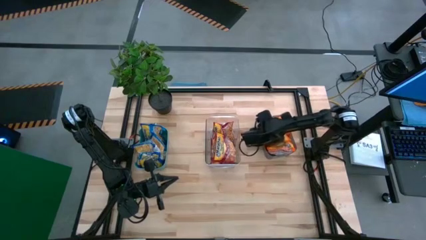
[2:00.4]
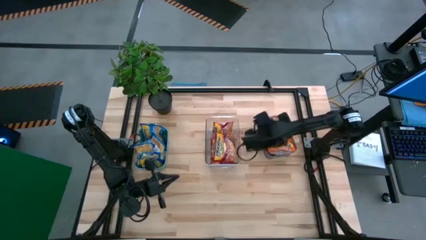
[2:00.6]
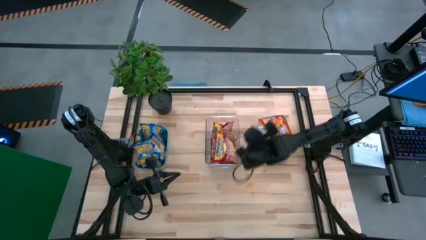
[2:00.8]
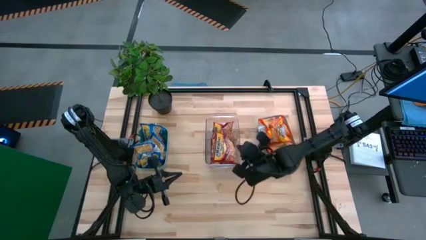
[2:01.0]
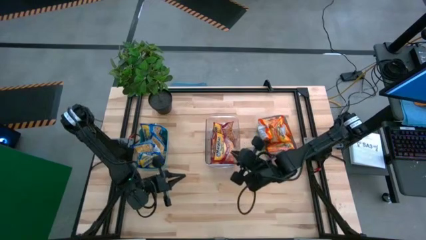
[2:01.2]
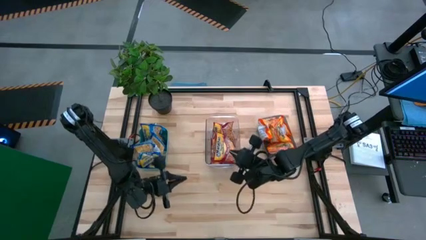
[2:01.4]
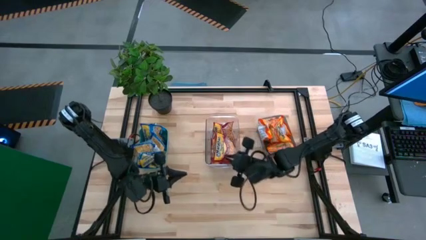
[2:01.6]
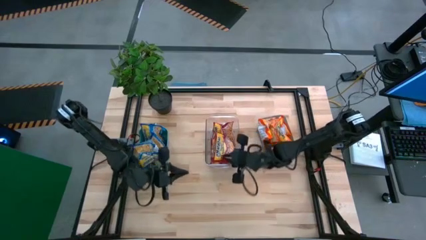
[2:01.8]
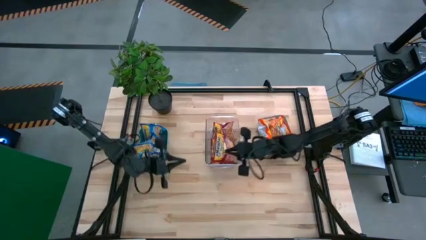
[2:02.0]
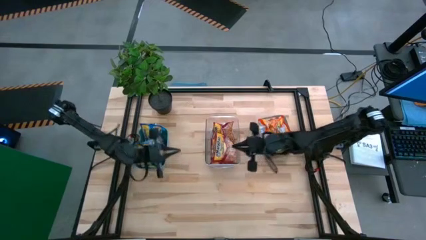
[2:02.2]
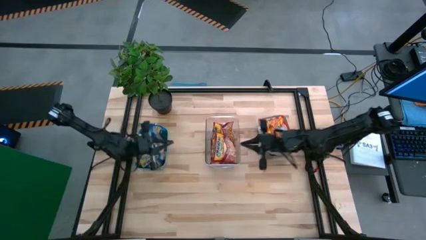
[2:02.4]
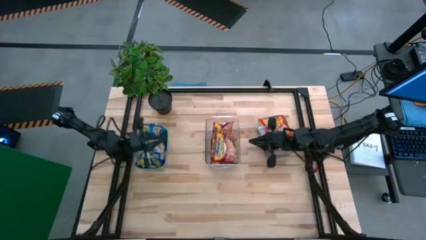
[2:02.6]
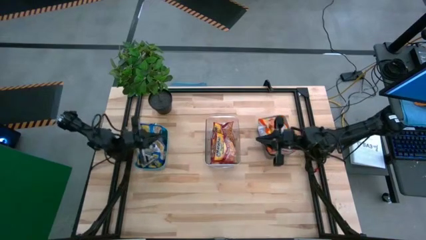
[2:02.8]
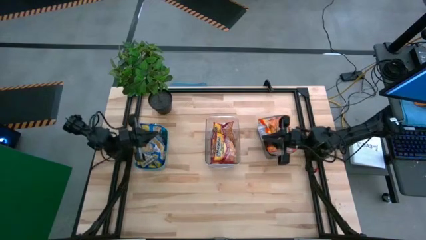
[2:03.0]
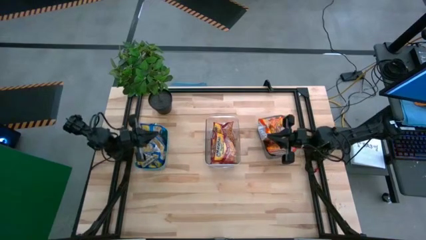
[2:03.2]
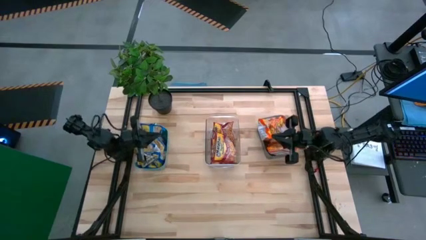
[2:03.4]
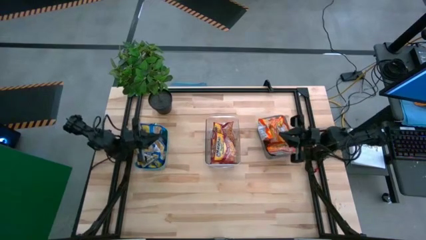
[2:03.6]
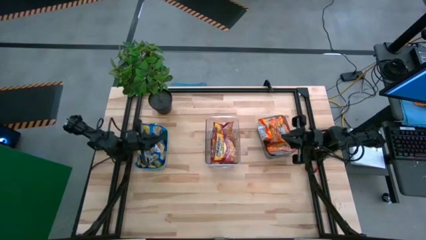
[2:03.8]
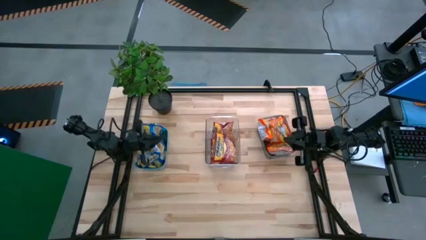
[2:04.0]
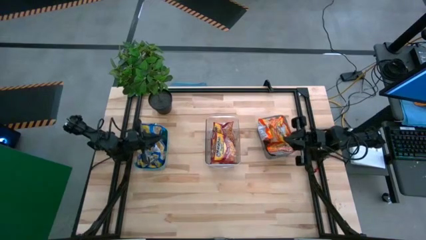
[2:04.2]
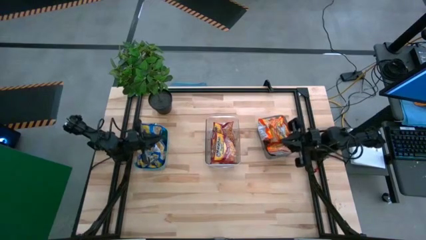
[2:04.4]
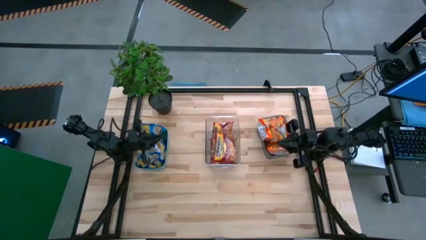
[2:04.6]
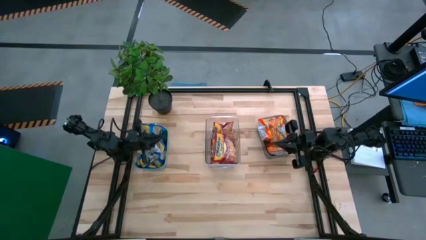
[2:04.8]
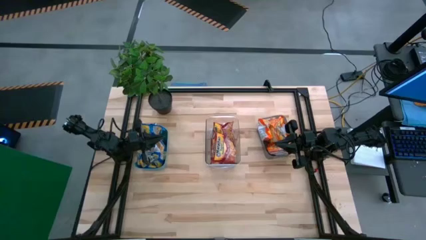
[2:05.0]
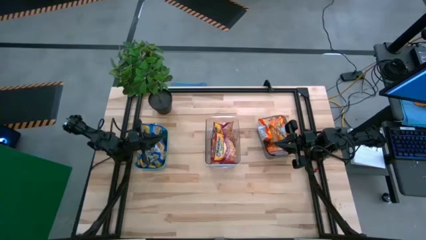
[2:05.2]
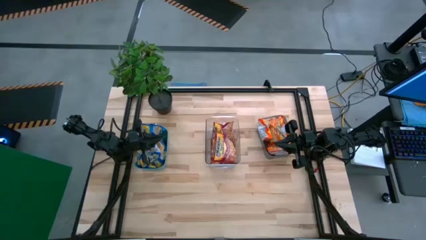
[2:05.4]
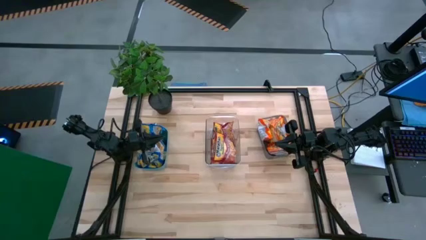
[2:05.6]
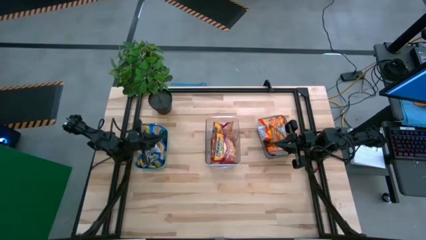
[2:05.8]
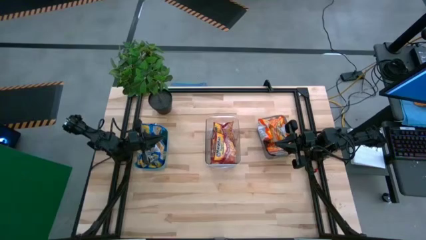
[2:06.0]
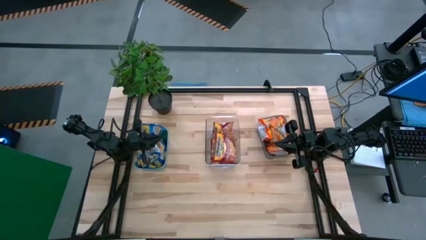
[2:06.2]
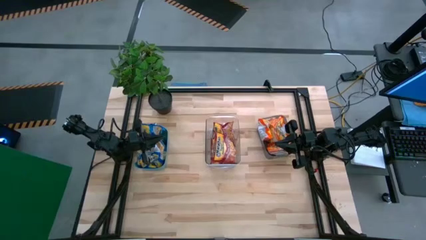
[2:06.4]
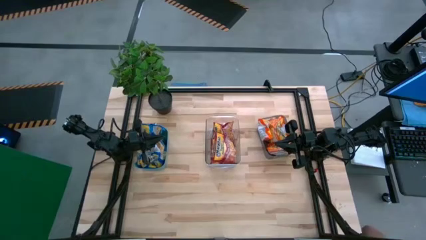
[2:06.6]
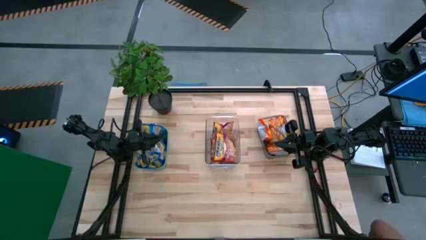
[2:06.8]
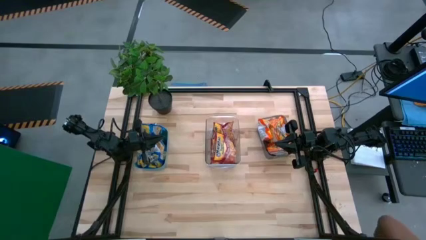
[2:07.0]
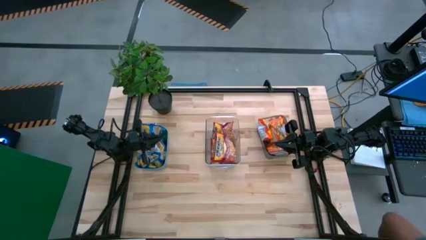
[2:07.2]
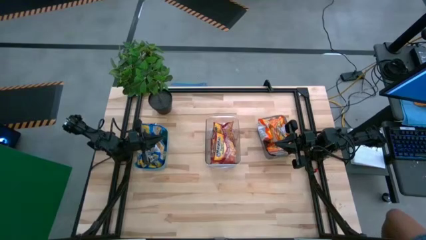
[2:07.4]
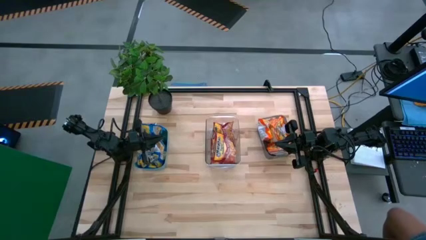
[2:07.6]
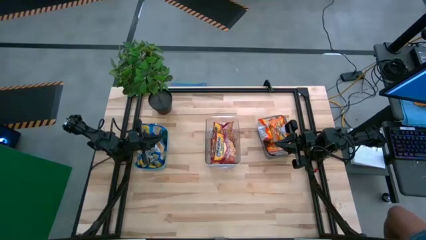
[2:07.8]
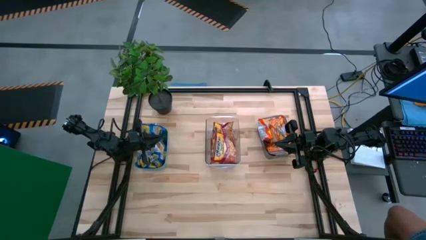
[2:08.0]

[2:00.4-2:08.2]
Task: Sort Maruchan noodles
Return to Home Position

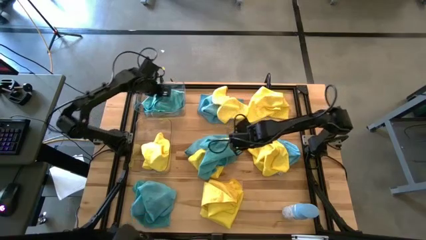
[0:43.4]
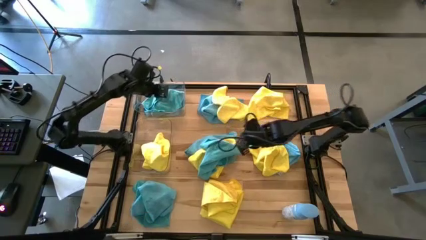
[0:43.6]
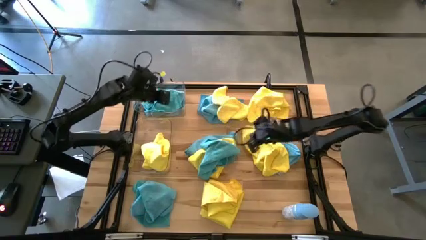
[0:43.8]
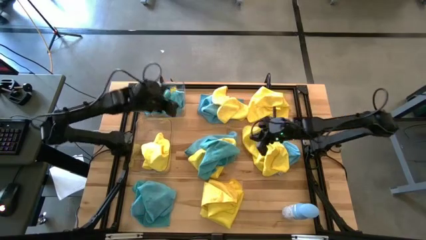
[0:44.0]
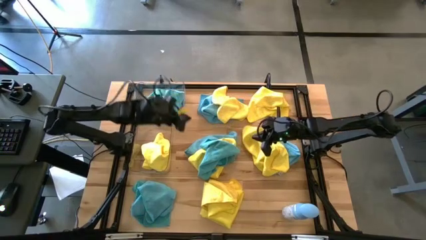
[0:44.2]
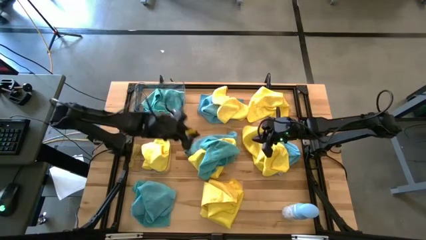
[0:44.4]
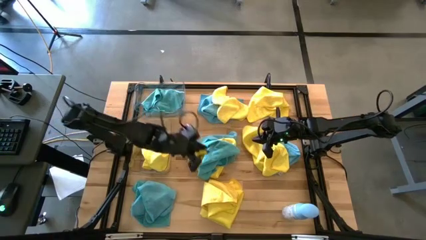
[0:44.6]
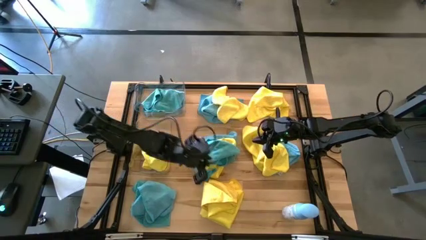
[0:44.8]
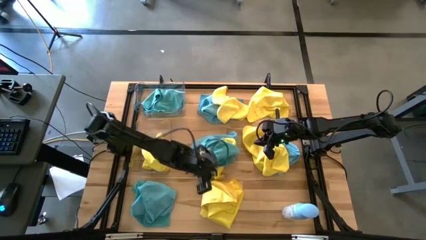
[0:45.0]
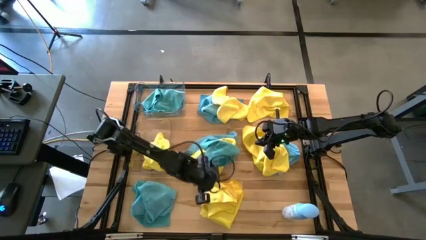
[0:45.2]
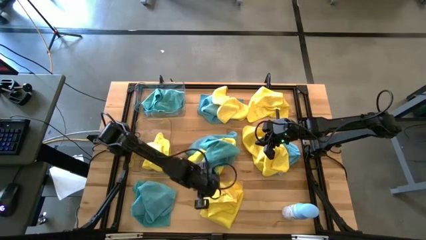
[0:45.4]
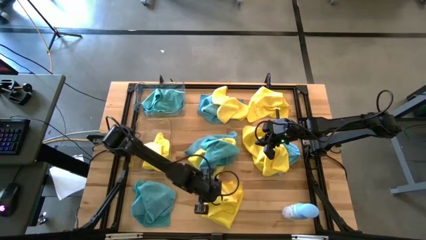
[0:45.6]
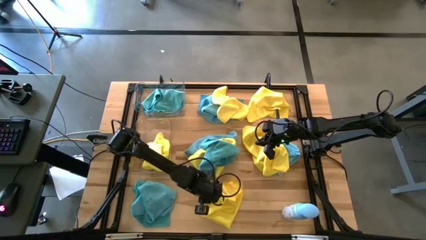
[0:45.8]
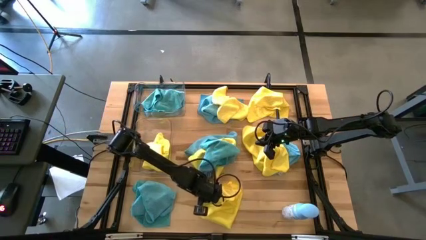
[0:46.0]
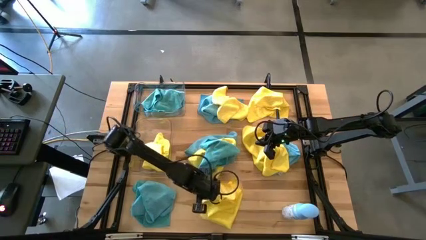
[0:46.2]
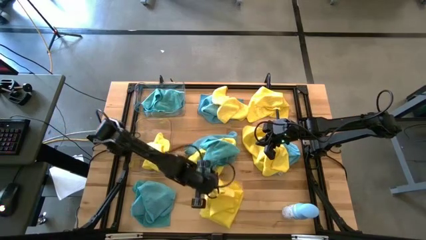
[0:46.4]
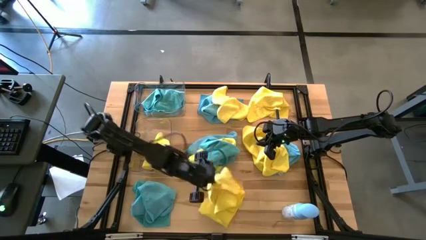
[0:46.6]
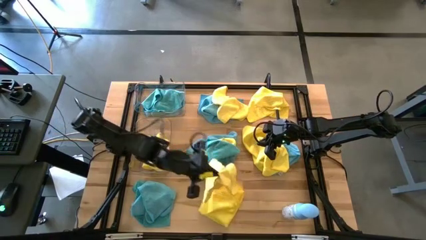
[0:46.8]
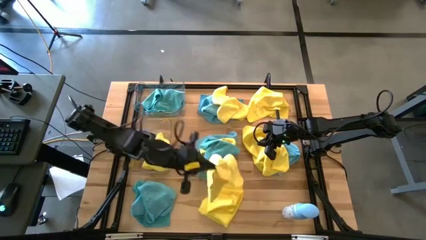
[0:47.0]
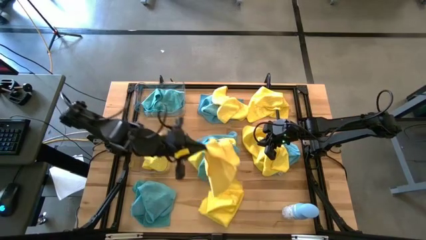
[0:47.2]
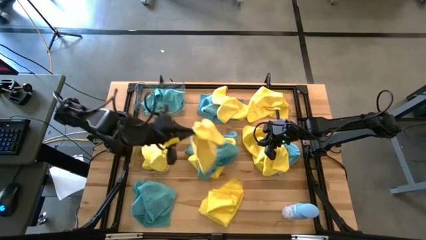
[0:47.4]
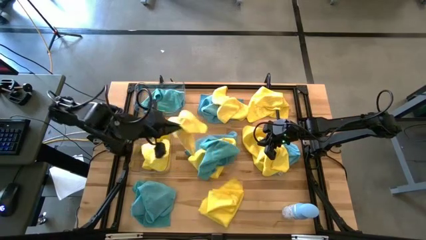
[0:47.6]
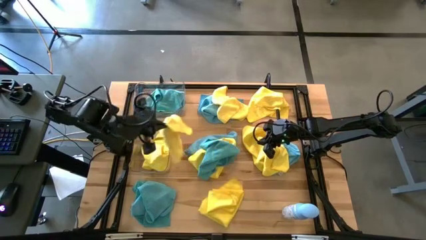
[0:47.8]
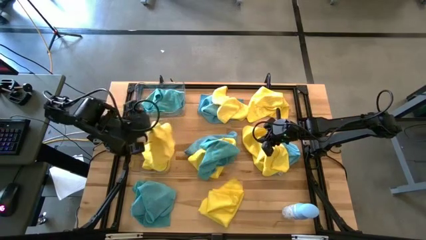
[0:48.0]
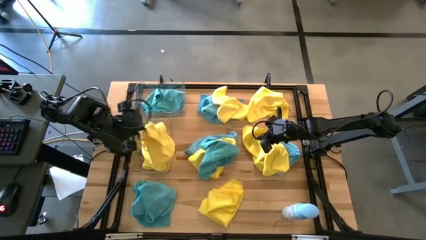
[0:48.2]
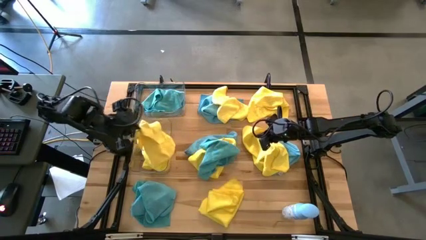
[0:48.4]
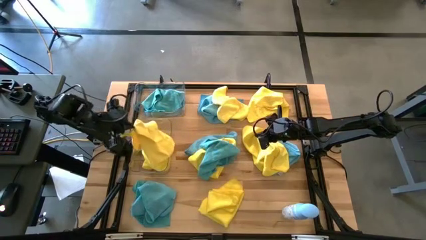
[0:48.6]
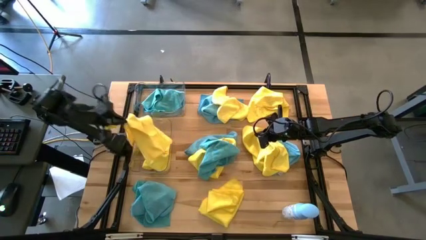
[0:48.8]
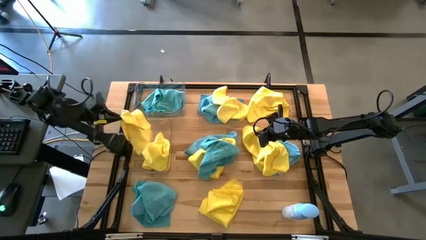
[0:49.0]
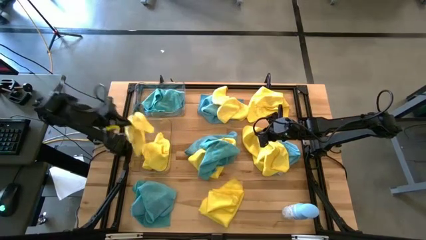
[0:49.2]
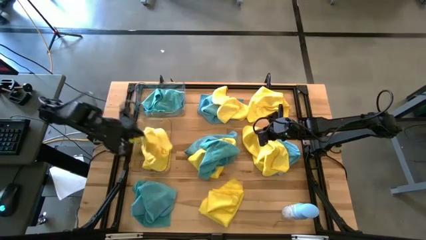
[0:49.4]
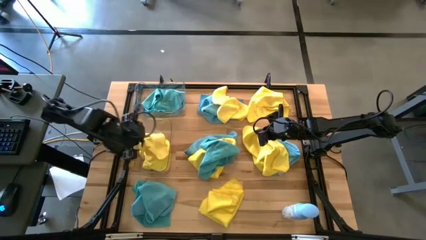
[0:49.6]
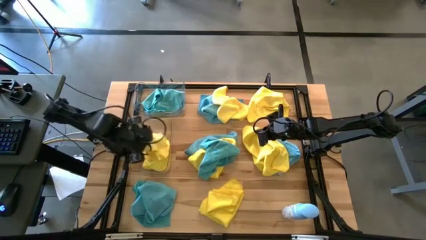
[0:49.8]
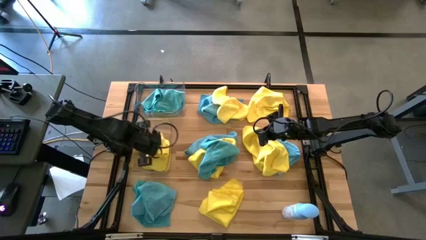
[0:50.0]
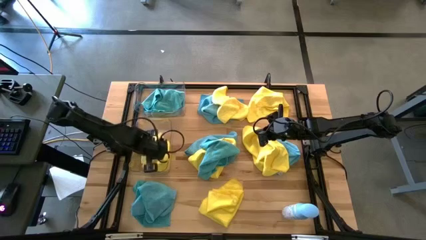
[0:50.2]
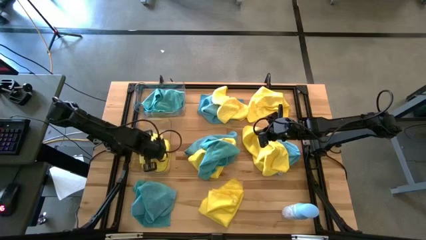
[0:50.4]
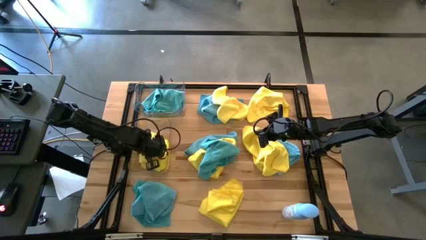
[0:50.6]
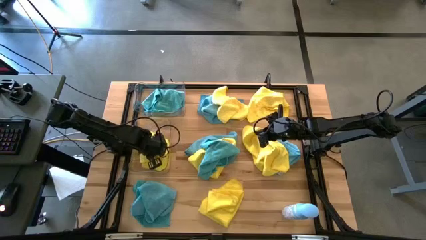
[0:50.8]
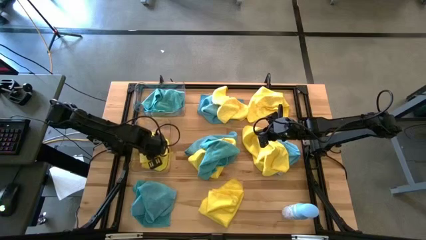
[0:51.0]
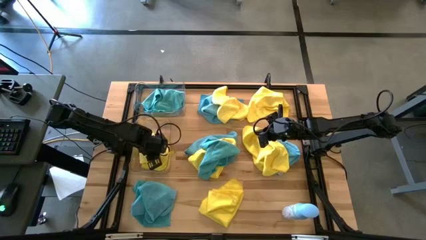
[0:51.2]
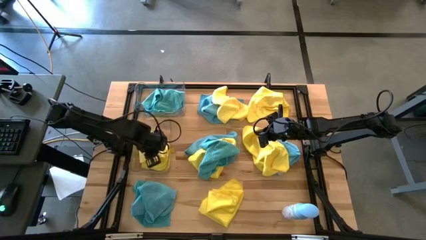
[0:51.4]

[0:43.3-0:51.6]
Task: Sort microfiber towel by color & place in baskets
Put the yellow microfiber cloth into the bottom transparent bin
